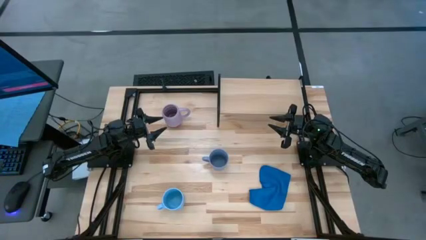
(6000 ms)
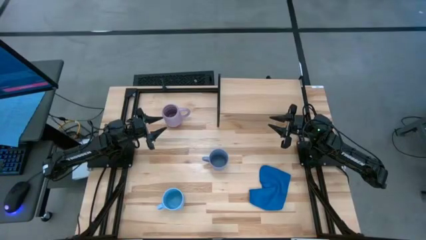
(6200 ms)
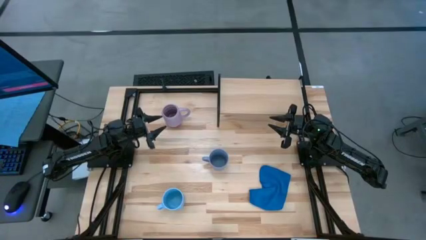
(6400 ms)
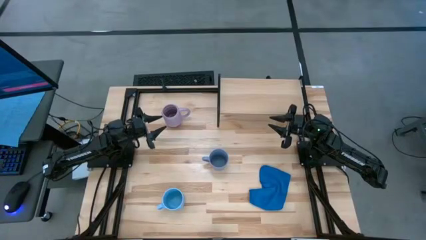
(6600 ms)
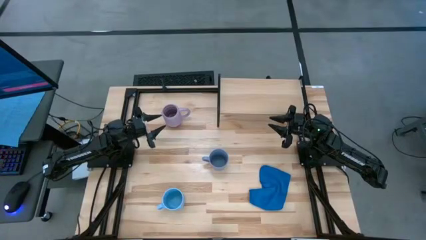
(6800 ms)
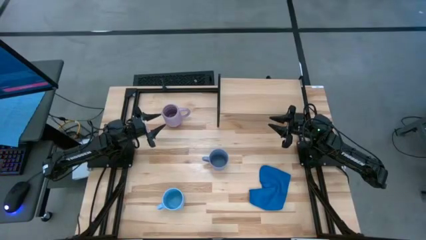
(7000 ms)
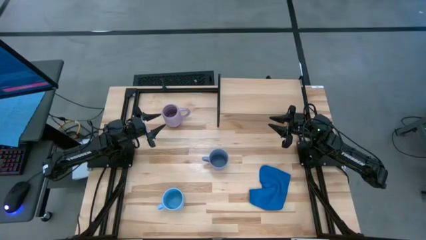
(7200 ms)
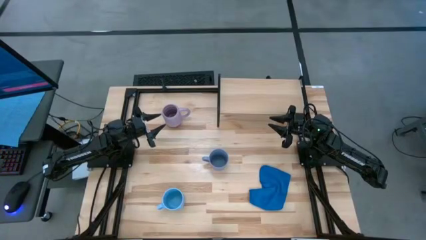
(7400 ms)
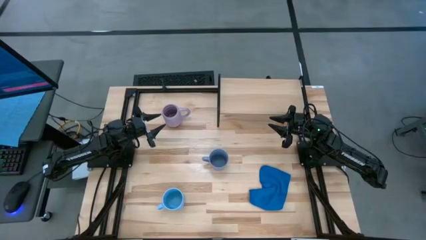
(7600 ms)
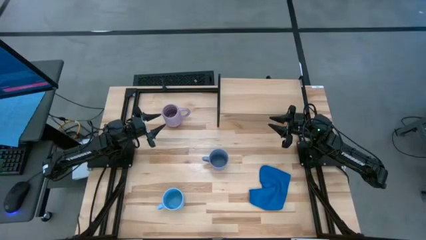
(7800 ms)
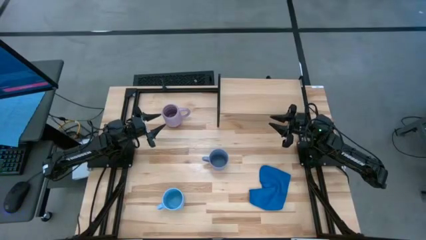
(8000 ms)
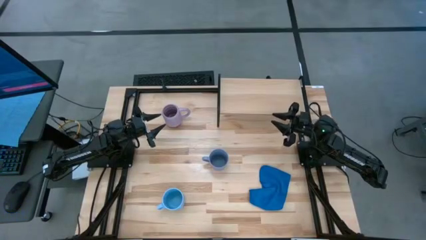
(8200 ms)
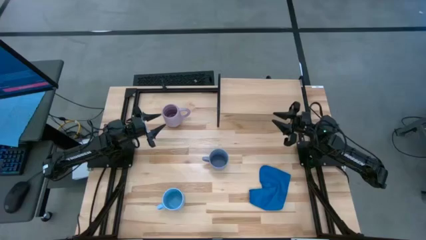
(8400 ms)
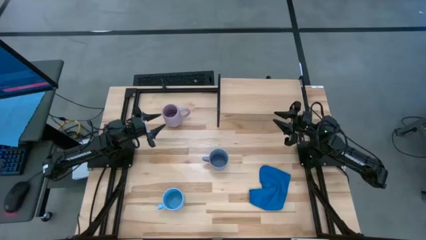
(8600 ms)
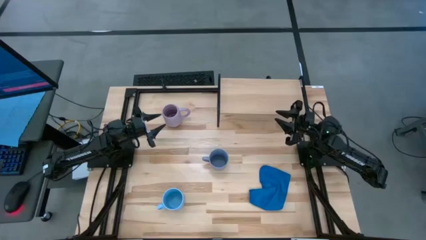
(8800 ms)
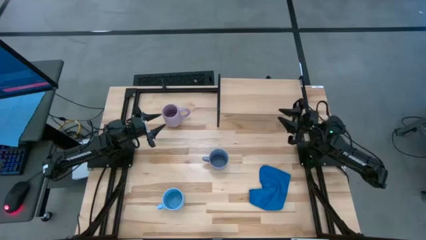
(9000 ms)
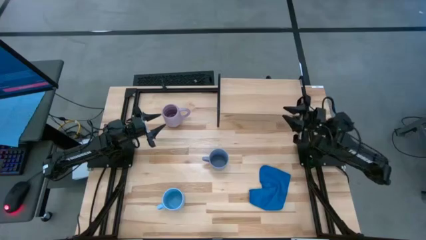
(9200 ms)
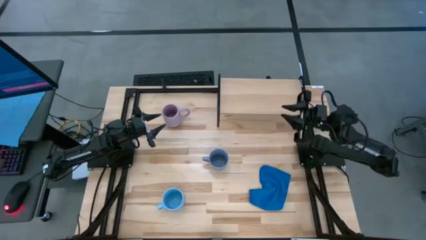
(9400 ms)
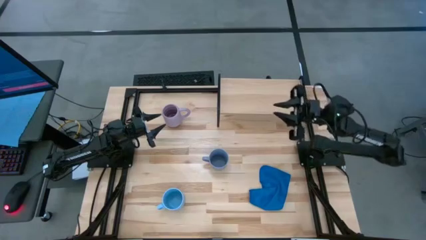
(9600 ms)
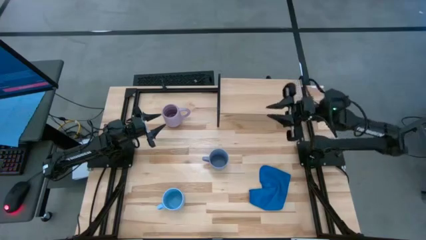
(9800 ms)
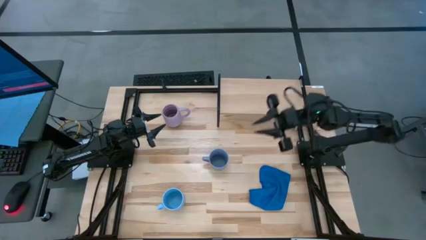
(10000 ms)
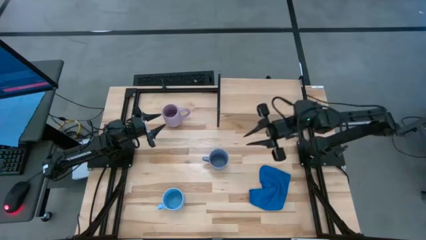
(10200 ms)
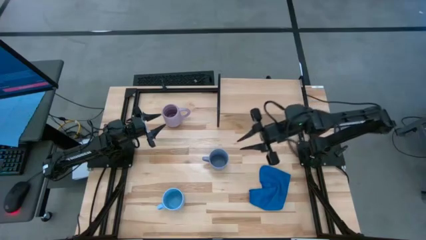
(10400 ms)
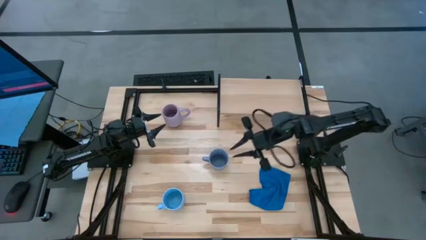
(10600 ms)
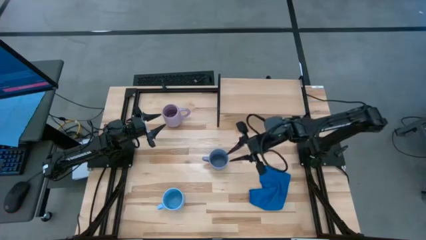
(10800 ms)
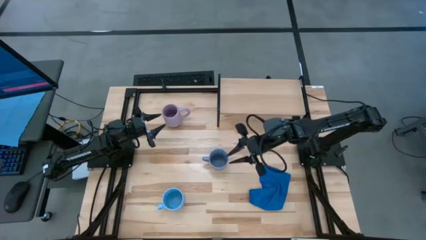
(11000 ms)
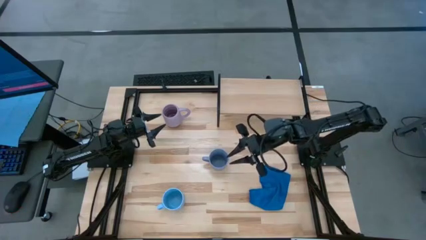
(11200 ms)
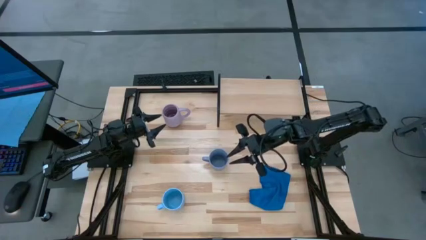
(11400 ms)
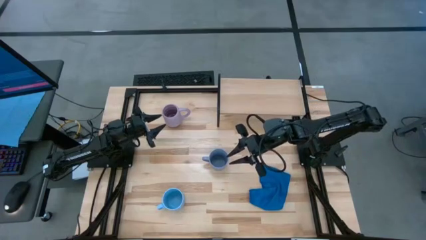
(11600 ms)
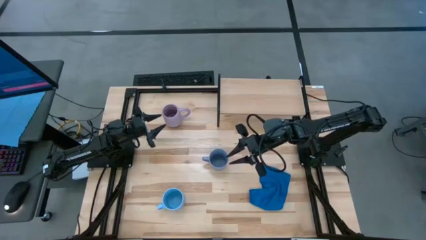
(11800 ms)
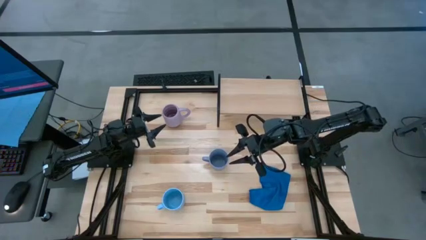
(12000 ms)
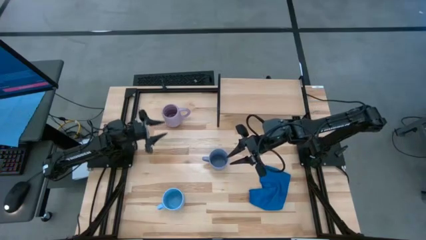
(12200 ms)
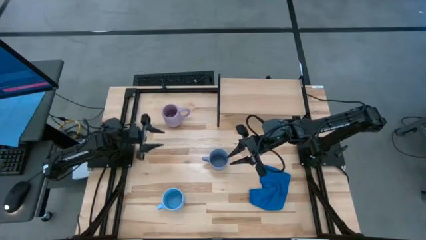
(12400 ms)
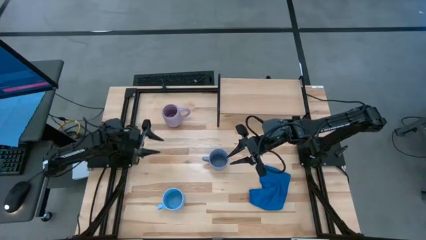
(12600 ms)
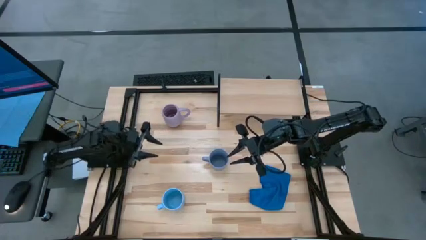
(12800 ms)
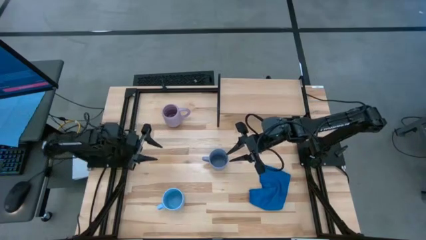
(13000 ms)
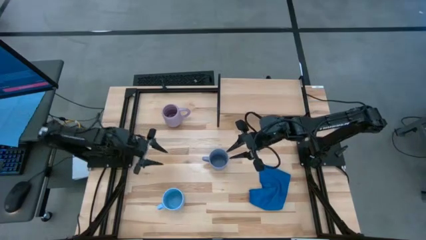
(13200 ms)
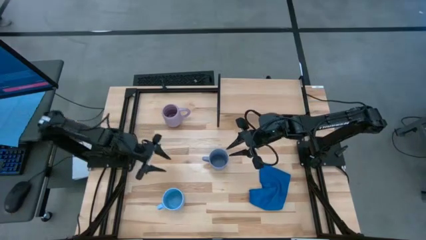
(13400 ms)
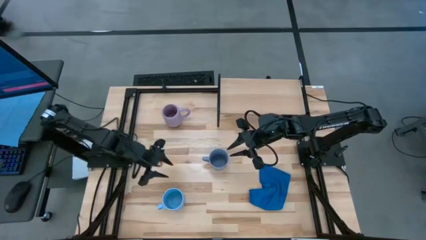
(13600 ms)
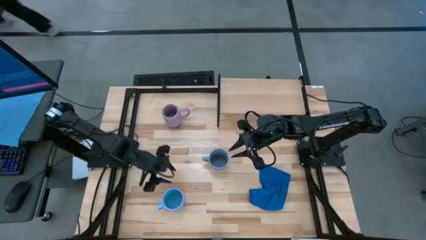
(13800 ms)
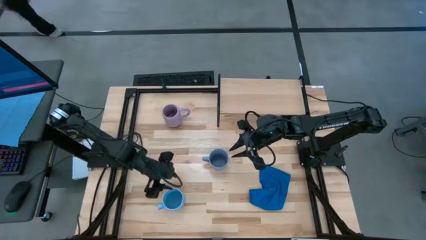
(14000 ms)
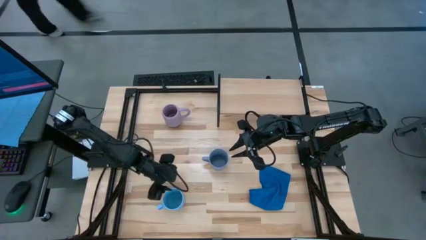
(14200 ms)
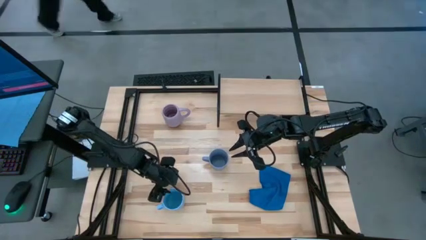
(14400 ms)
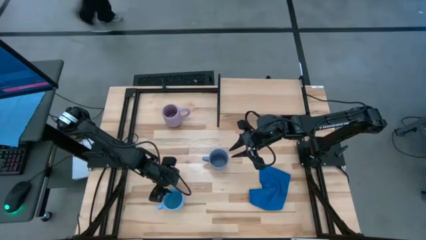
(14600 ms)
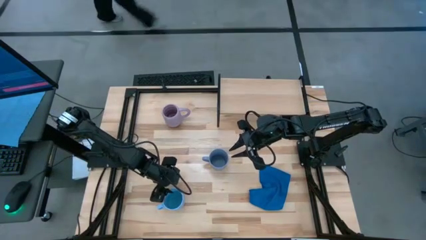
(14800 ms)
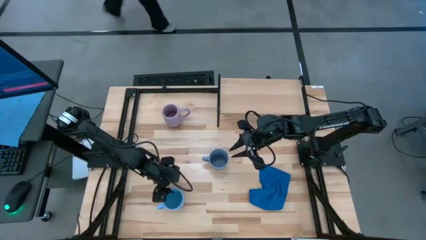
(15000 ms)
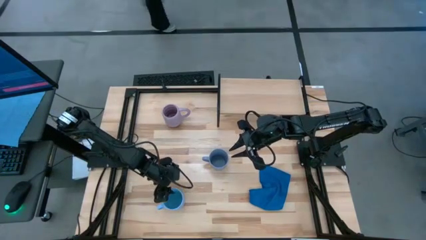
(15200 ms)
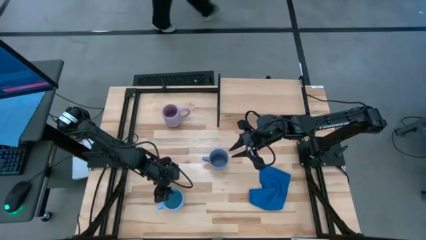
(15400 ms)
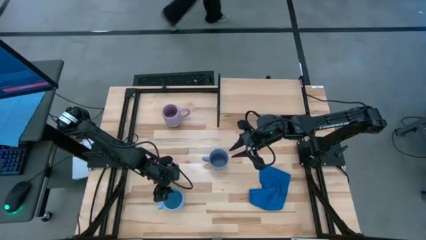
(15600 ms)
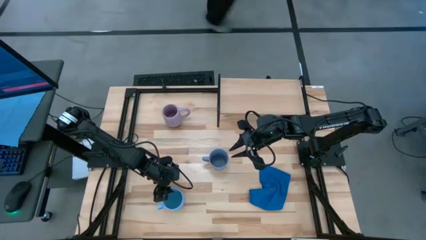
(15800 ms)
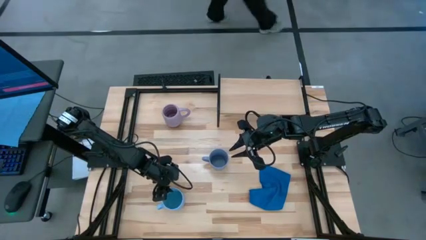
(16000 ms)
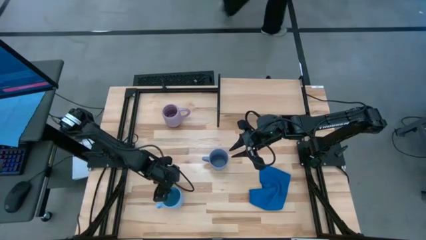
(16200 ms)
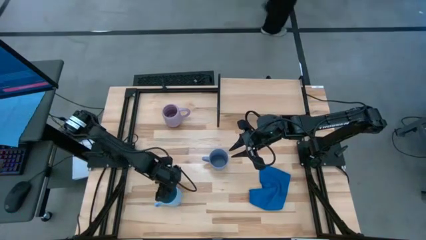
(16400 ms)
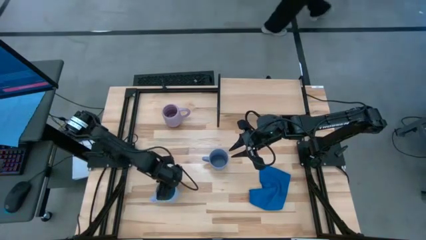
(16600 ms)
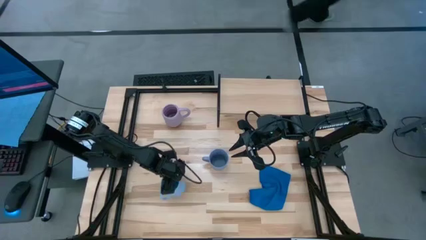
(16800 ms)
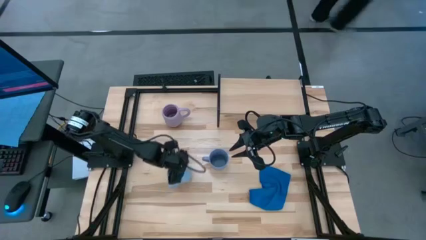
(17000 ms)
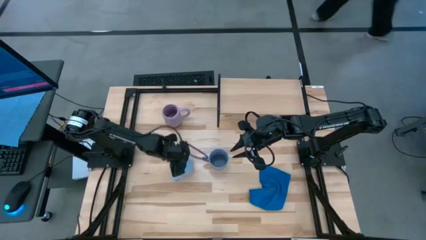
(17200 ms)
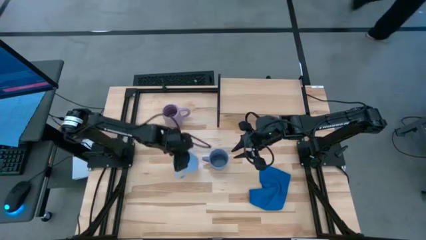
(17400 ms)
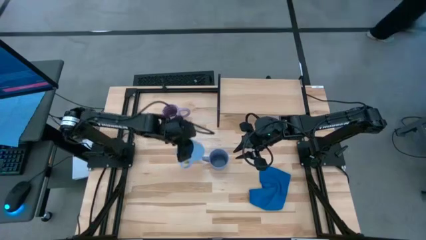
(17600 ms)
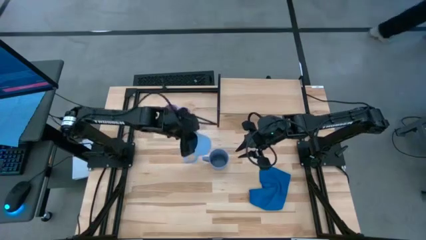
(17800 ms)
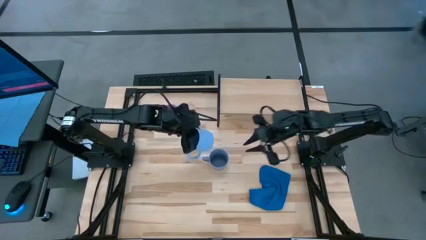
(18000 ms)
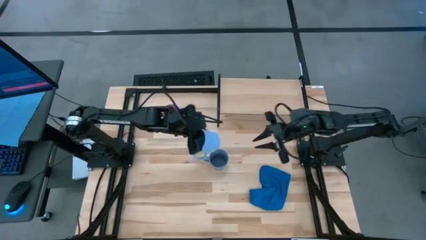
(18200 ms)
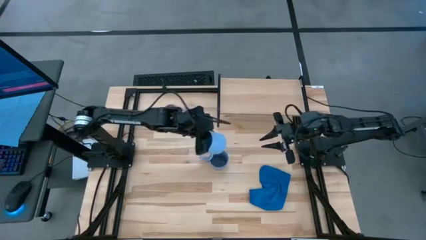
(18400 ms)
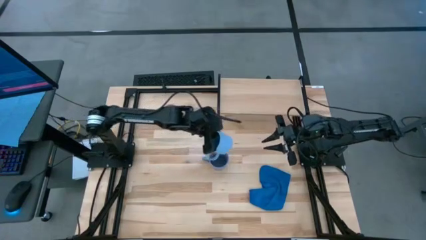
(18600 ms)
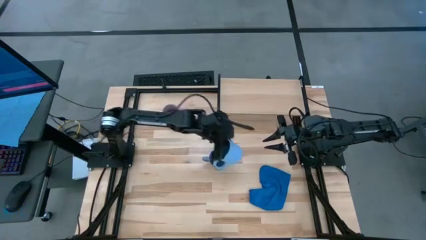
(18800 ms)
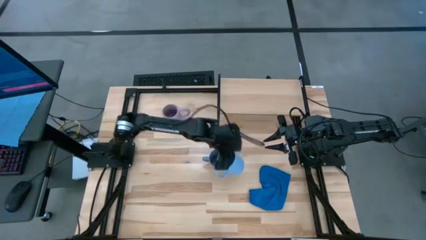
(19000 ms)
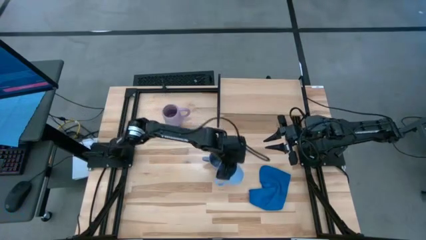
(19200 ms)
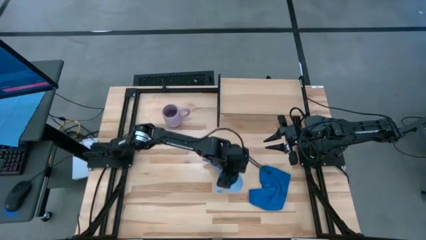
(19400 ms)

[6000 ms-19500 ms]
Task: Stack small to large cups/mugs on shelf
Put the light blue mug on the shelf

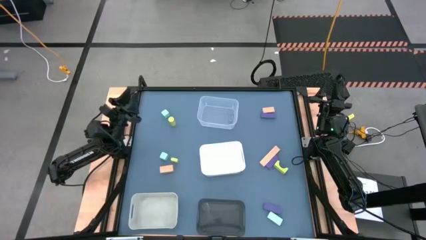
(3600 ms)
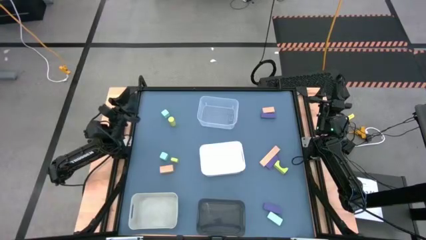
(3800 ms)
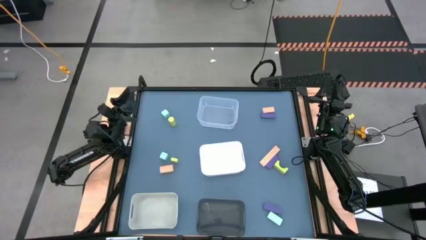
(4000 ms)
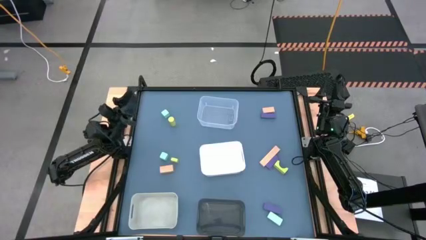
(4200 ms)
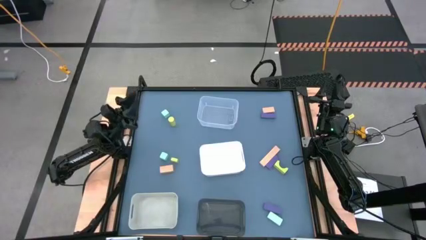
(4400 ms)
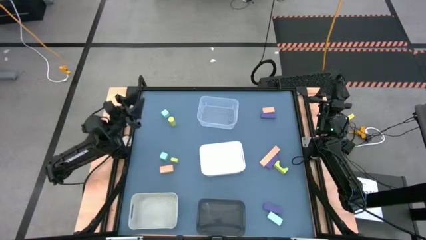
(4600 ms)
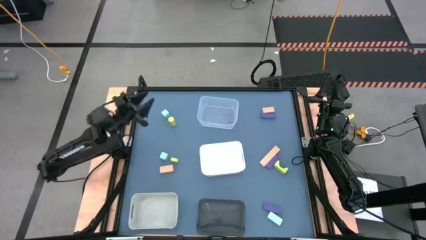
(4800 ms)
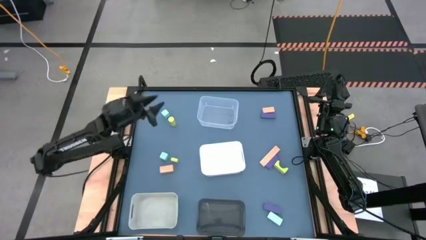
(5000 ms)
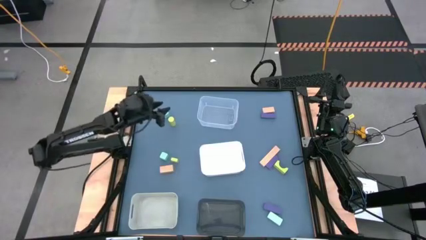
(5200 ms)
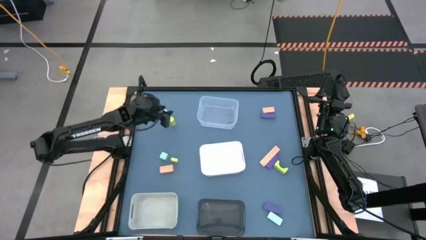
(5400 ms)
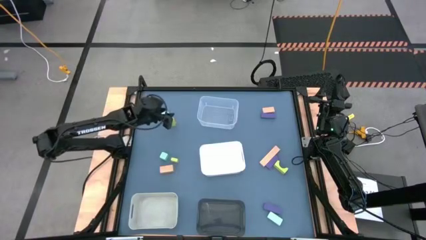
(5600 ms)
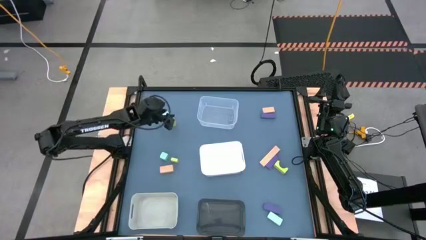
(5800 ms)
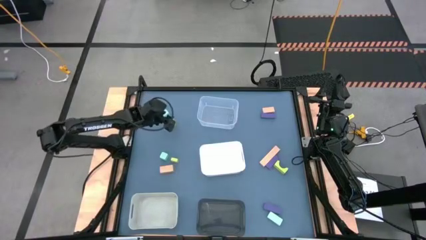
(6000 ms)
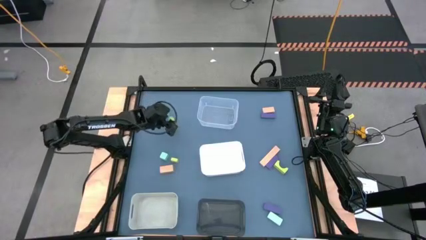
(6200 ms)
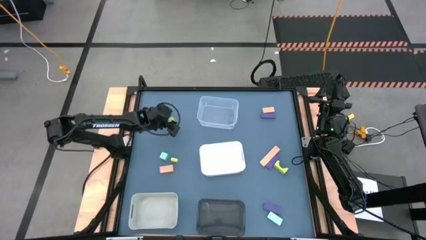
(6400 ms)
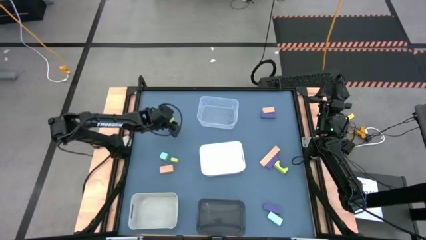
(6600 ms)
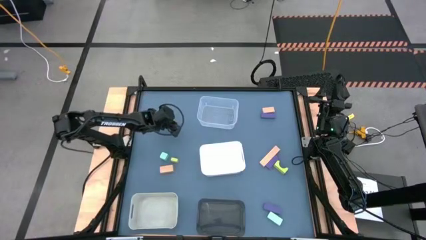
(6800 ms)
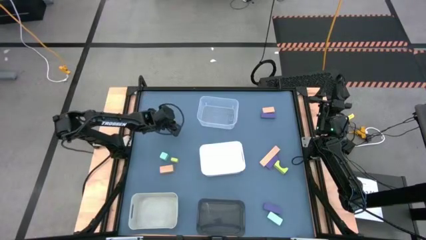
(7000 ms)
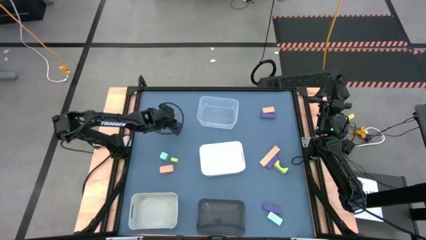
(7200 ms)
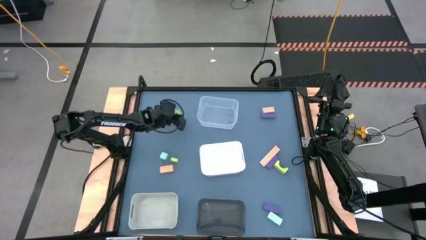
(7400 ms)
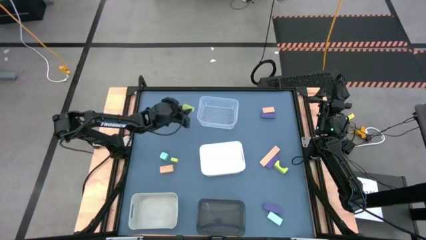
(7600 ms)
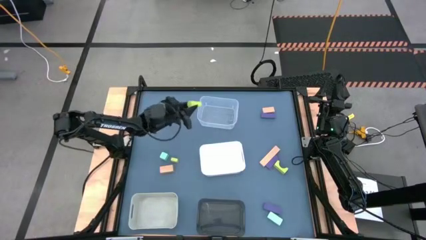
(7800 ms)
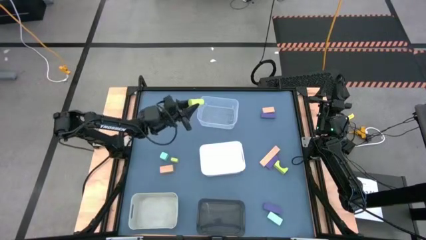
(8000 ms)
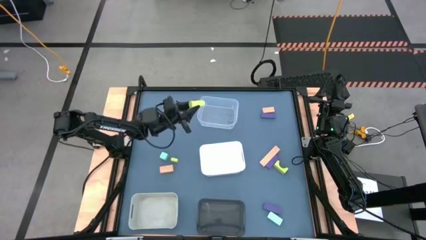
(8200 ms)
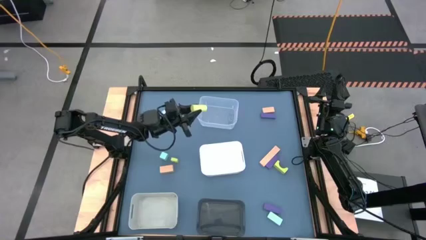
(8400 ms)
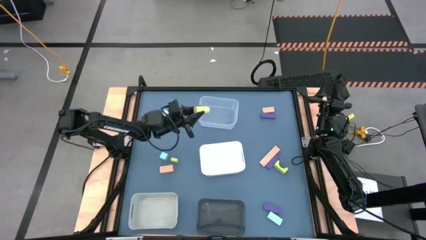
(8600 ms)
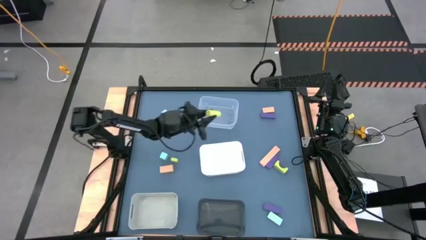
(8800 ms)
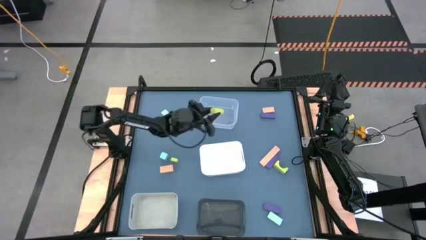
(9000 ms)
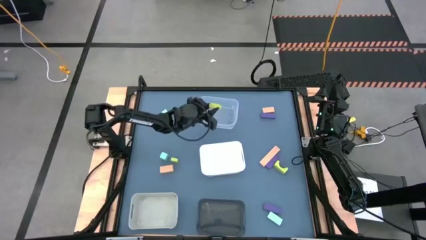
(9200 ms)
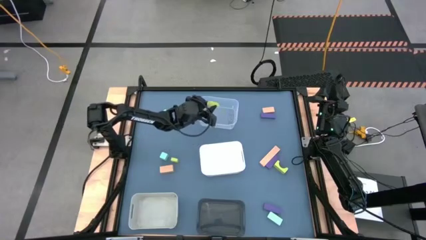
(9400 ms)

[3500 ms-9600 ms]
Task: Sort & place blocks by color
Put the top green block into the transparent bin
